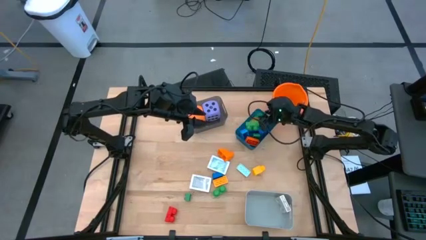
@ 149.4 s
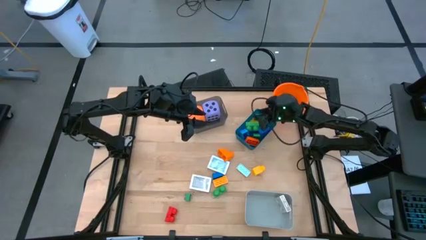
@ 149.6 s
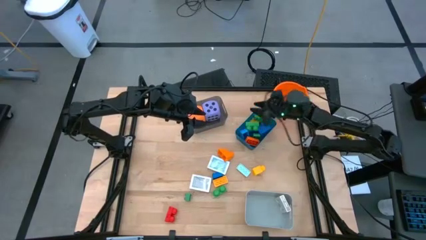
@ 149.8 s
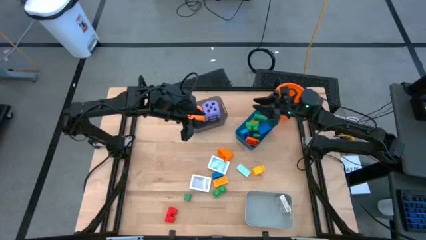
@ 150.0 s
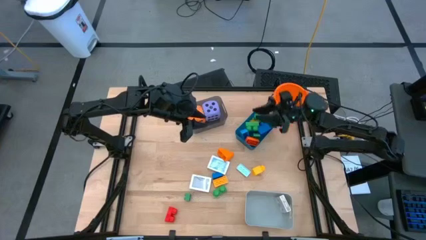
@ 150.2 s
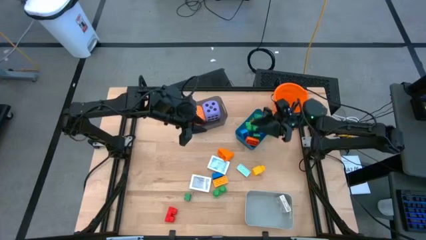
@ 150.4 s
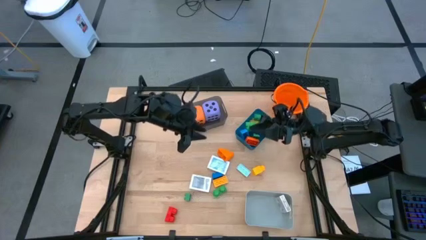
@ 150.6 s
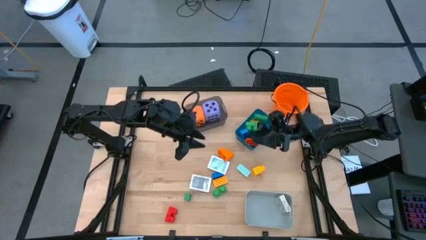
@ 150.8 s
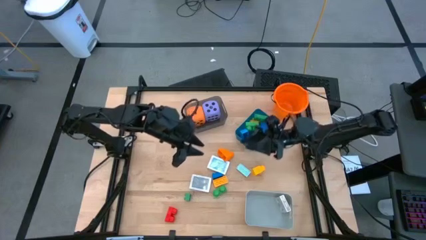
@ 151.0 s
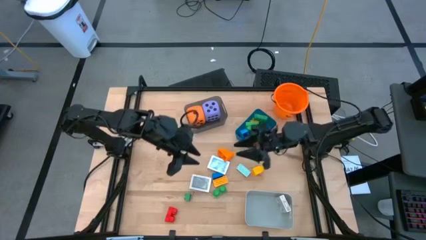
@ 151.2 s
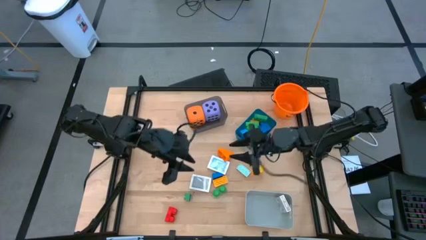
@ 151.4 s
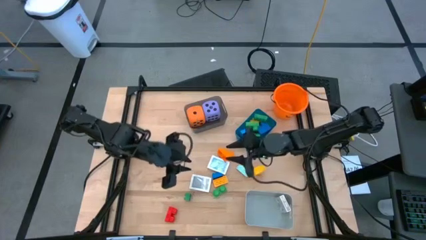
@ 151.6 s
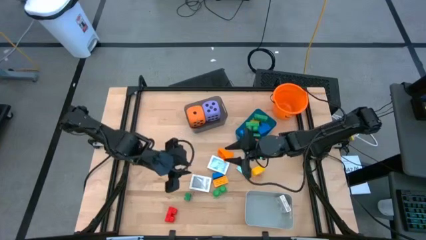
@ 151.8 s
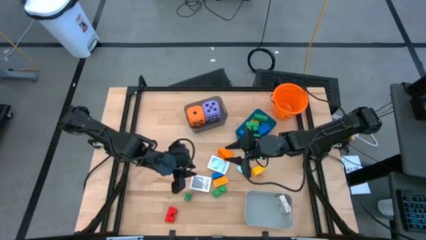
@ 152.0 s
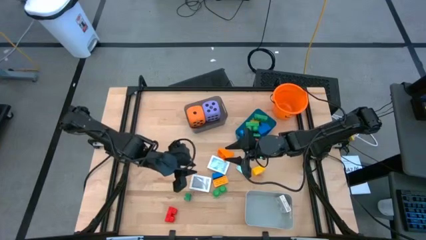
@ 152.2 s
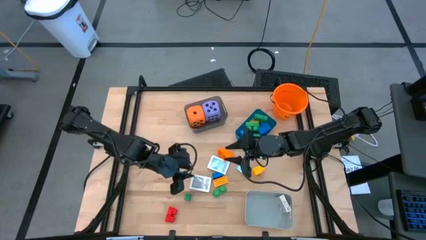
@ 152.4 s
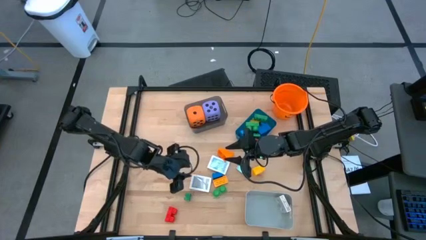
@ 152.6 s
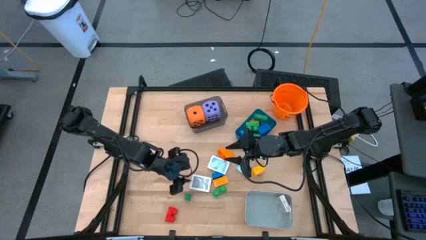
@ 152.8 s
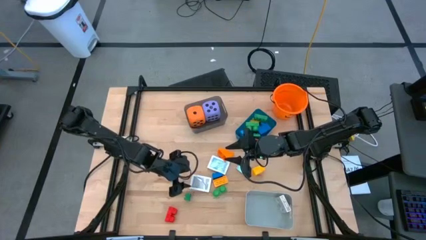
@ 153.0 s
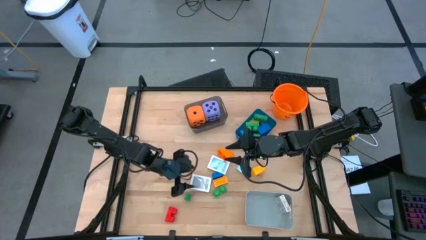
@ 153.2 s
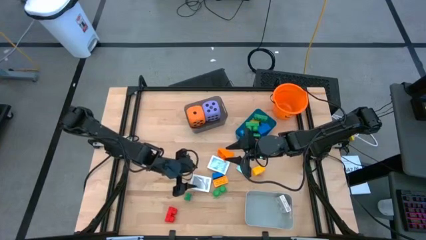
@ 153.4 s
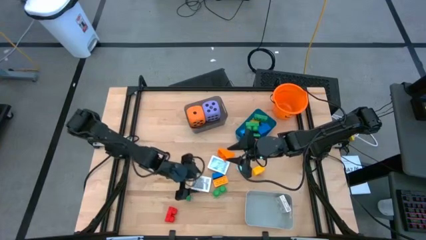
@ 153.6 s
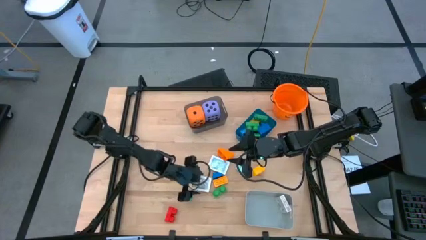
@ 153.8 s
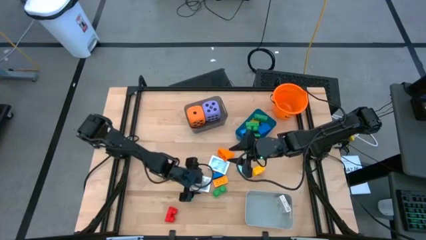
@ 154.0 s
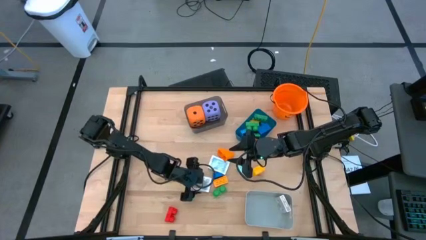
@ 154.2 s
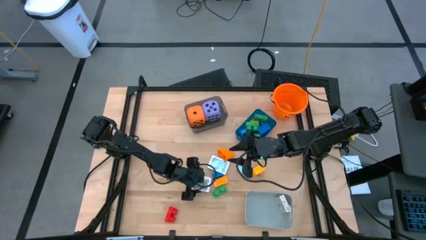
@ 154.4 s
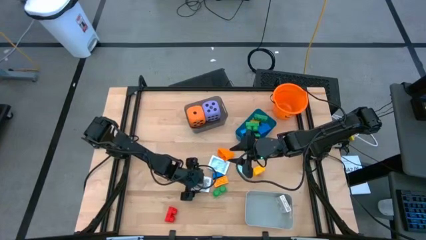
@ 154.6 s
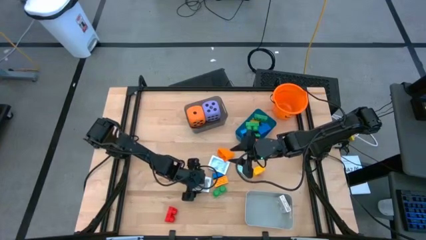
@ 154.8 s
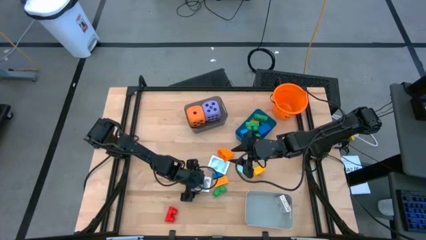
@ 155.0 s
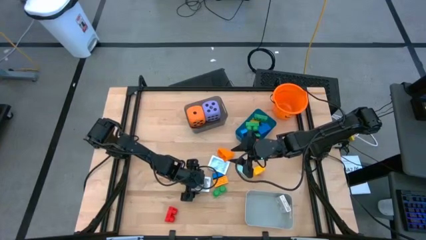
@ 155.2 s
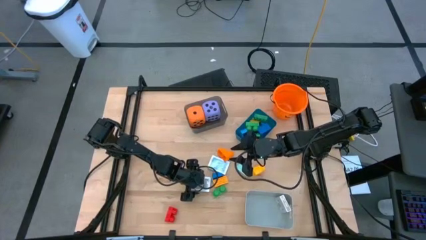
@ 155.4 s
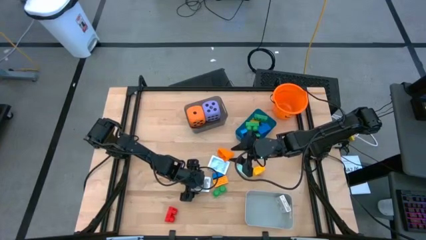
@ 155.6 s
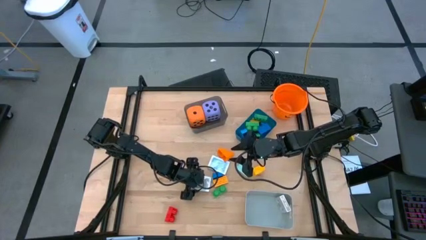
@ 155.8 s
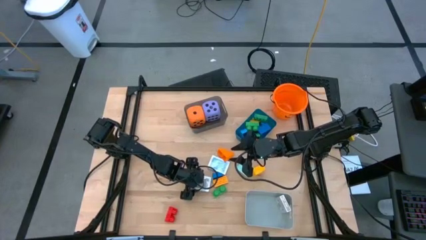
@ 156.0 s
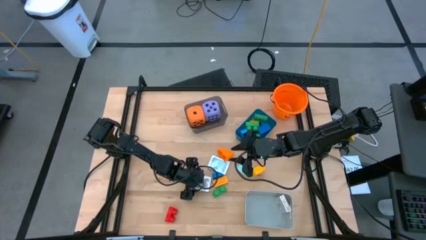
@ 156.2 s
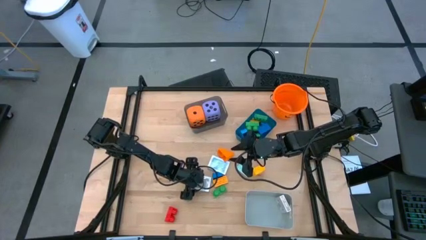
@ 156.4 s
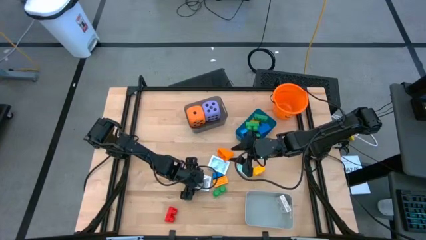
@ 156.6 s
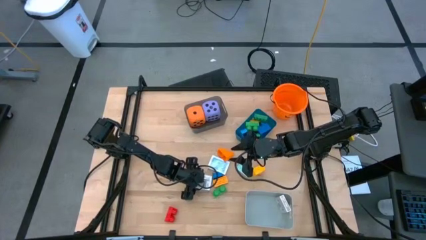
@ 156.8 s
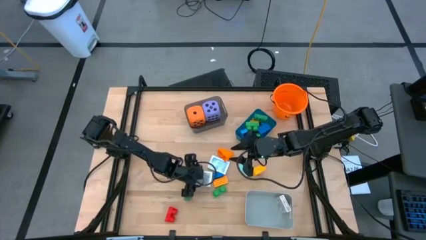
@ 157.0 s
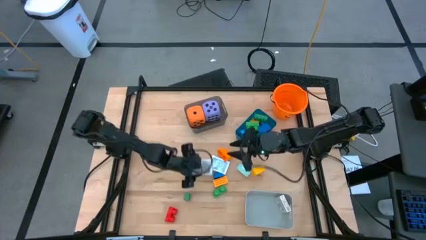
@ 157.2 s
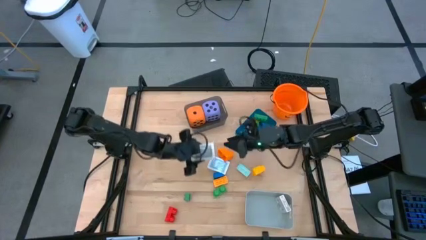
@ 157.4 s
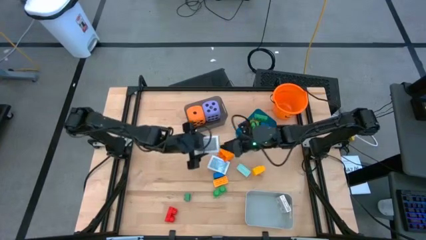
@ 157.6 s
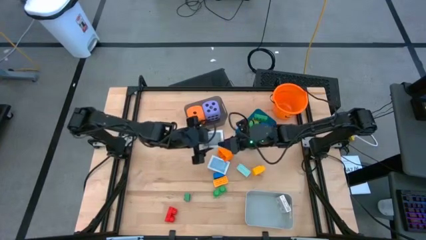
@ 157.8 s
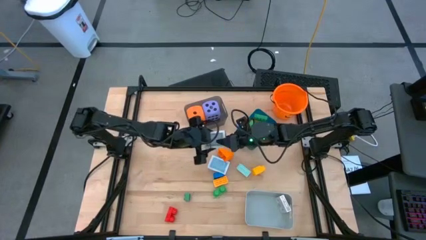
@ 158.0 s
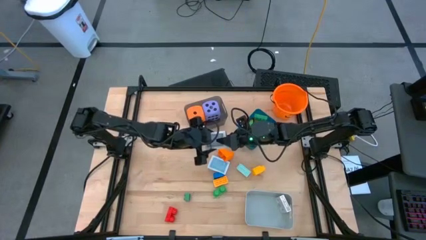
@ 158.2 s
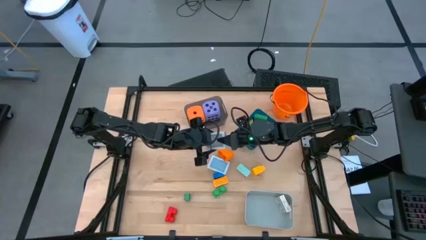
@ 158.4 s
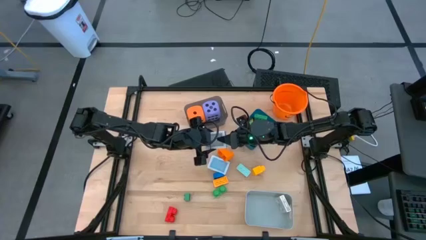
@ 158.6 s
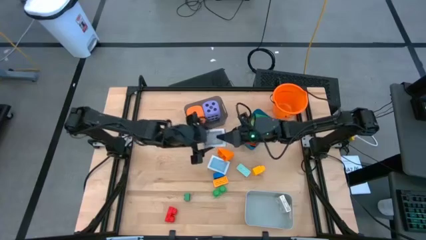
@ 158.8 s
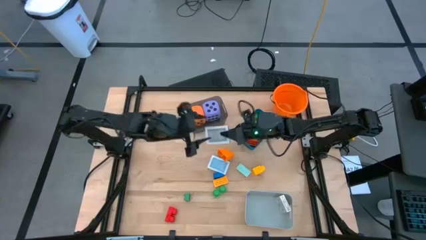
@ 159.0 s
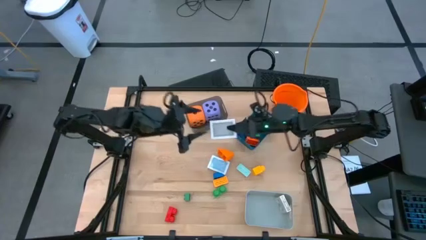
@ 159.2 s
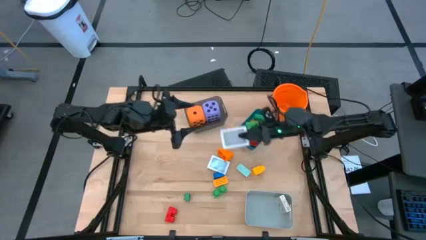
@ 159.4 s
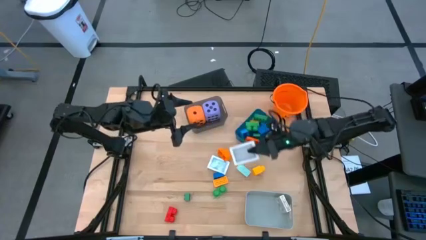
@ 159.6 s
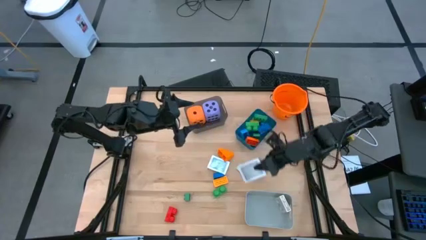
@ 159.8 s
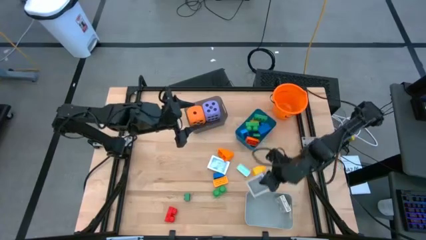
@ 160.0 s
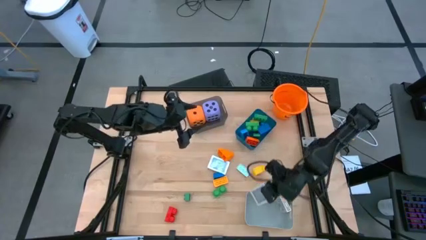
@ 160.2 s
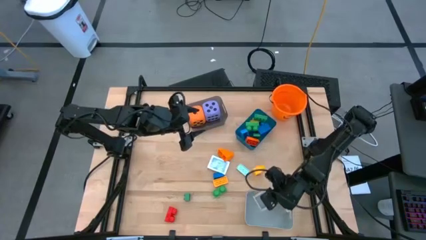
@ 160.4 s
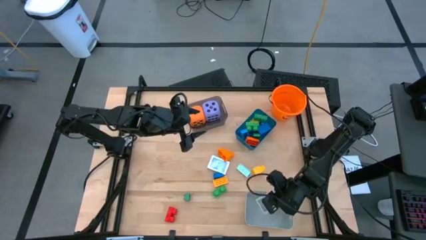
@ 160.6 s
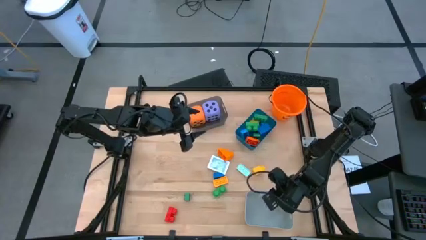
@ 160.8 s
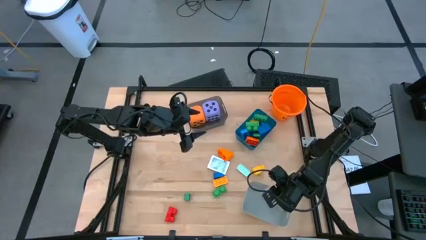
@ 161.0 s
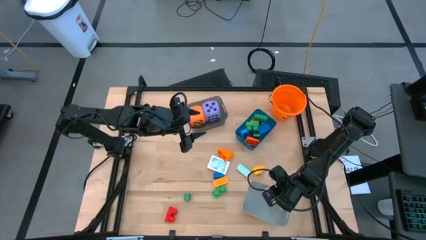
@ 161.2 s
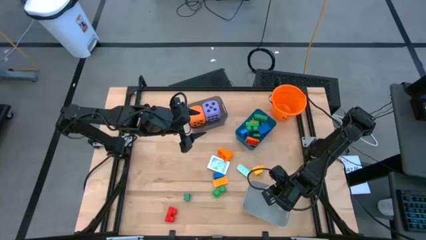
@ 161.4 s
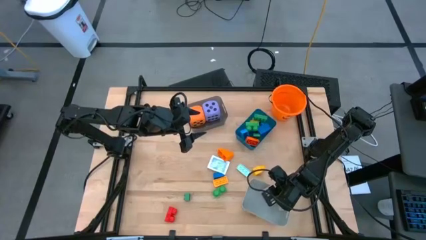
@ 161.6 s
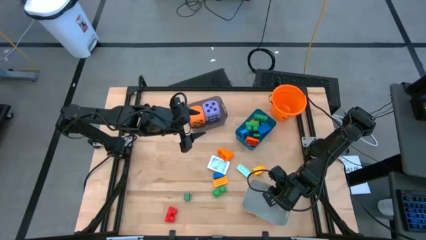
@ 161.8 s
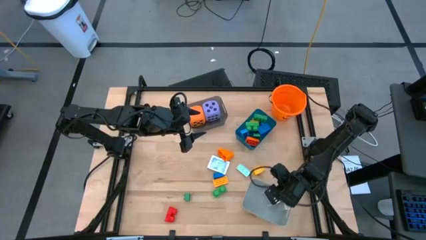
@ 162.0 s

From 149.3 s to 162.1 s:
Task: Pick & Place Toys
Put the black deck of cards into the gray bin

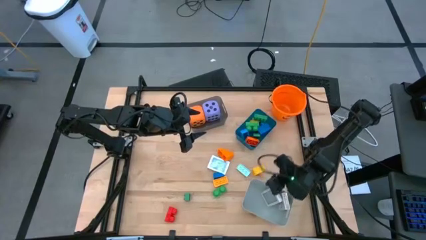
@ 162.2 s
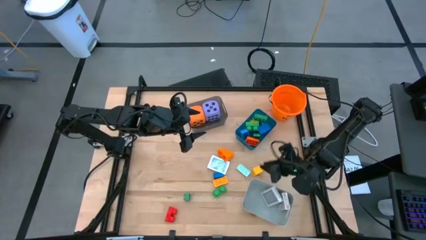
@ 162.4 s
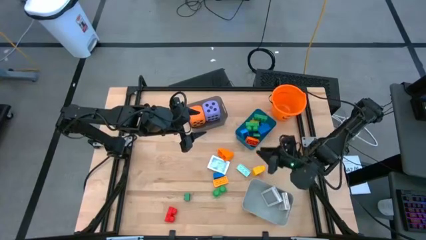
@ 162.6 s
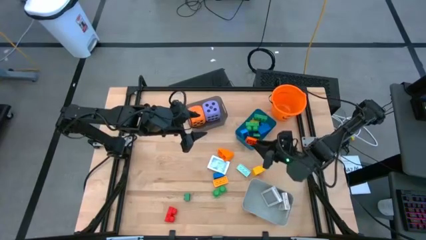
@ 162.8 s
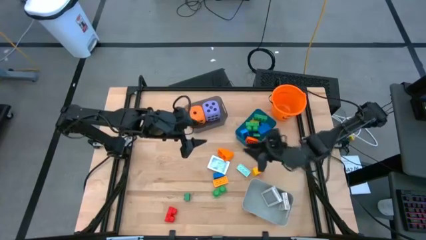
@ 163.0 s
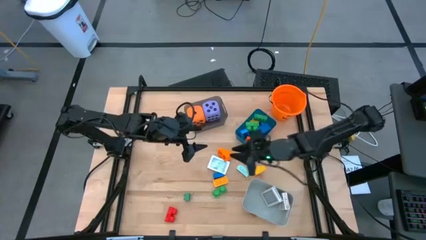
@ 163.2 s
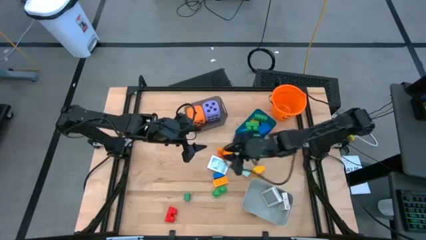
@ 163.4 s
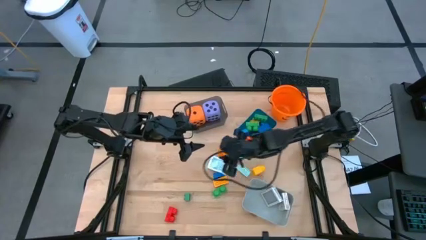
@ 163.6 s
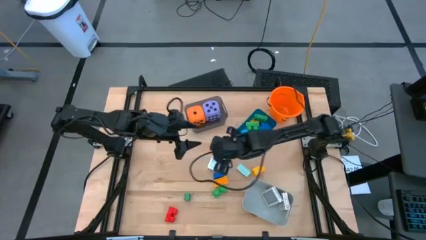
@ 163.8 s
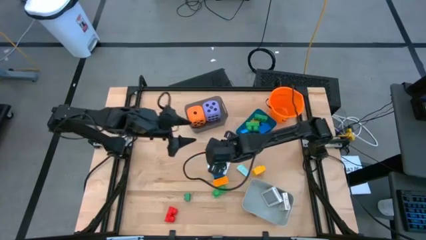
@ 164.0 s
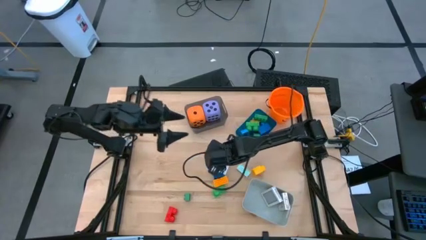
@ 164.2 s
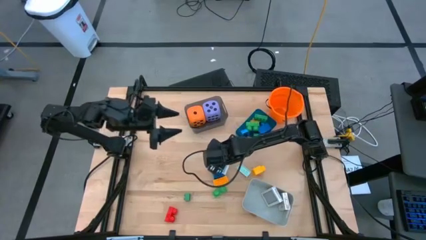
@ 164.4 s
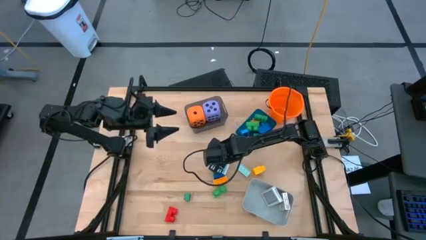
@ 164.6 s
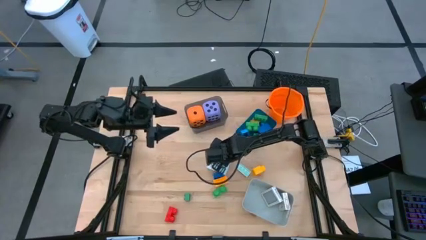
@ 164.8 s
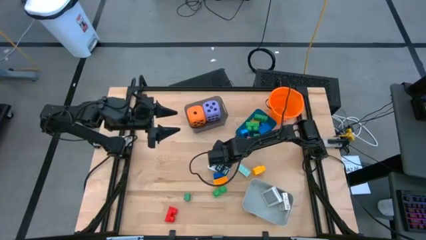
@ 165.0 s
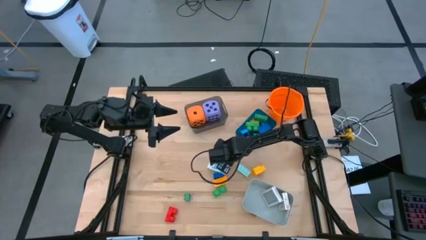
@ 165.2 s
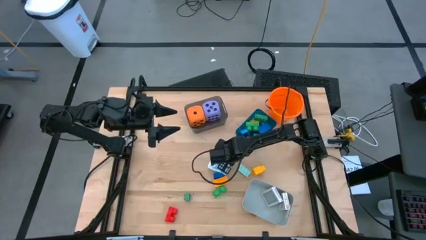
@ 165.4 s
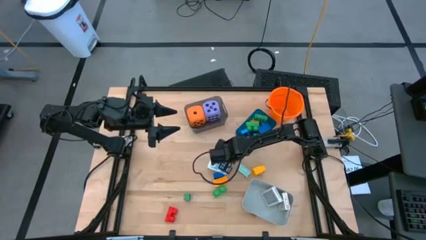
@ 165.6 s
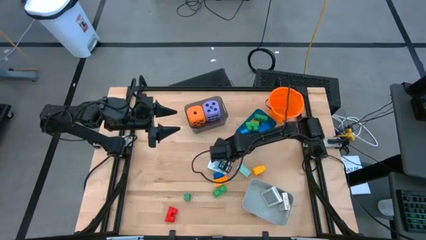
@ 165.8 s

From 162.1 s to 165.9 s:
Put the orange game piece into the blue bin

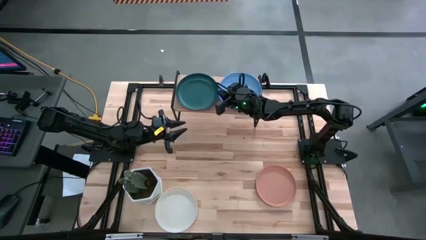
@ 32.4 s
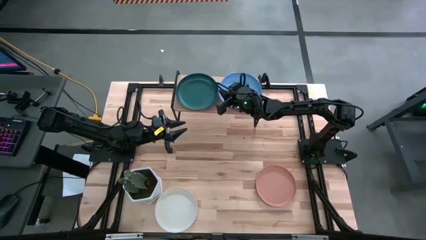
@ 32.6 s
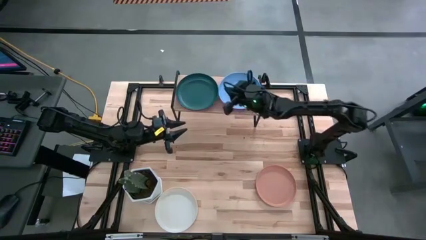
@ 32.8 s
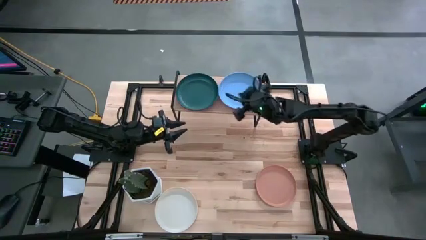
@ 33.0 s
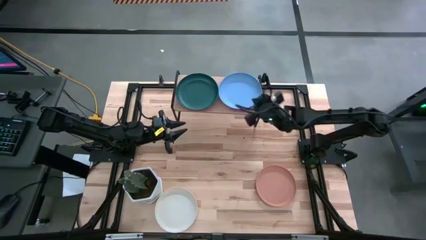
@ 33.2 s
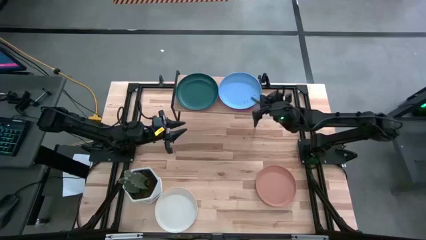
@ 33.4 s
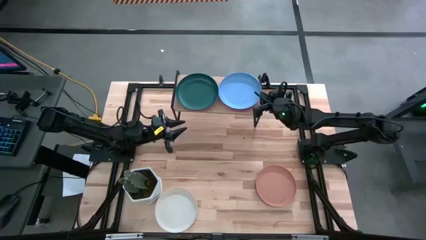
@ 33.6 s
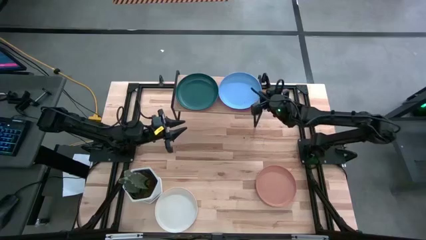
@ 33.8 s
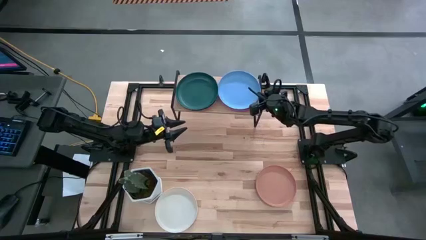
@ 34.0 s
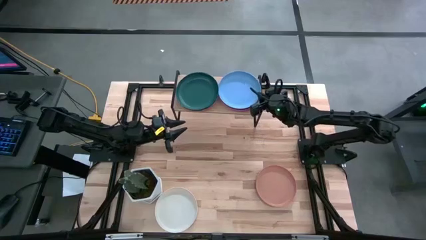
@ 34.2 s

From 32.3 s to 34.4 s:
Task: Place and stack plates onto a shelf
Adjust the light blue plate
